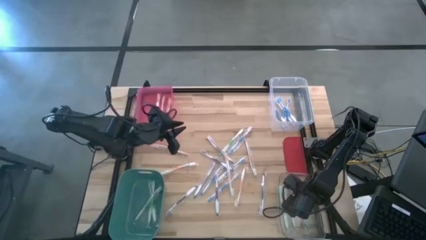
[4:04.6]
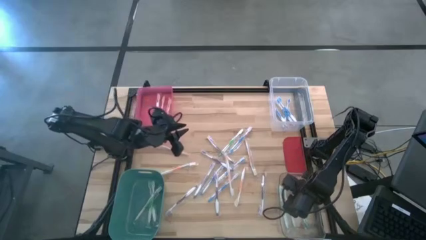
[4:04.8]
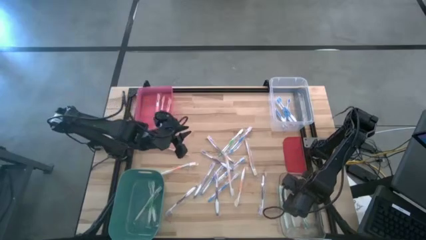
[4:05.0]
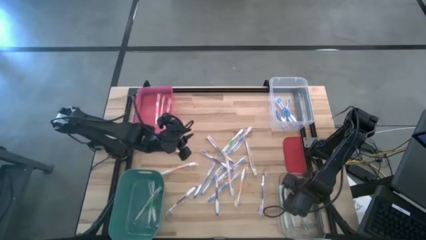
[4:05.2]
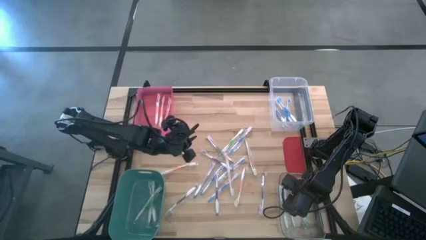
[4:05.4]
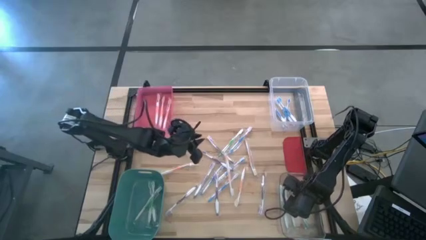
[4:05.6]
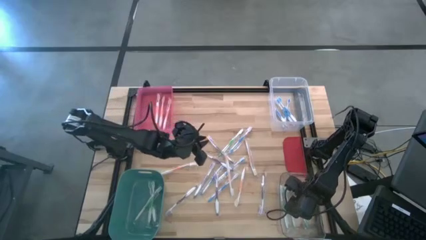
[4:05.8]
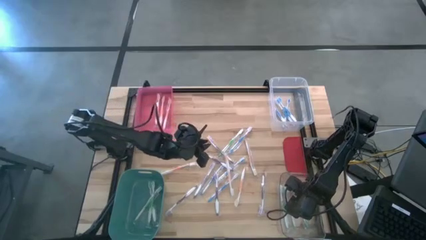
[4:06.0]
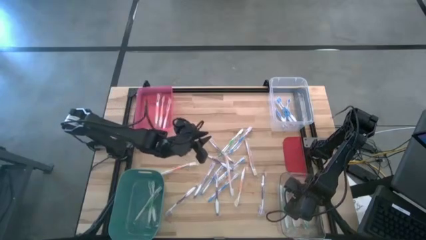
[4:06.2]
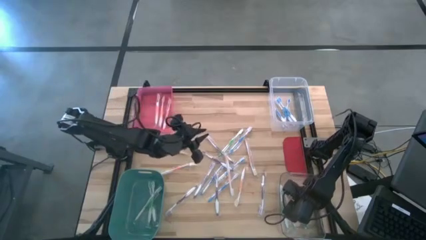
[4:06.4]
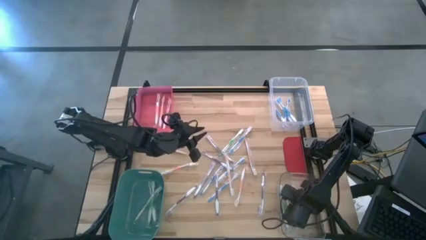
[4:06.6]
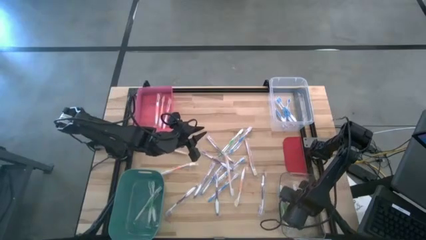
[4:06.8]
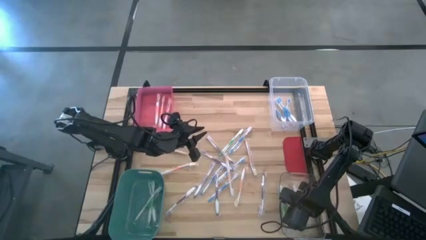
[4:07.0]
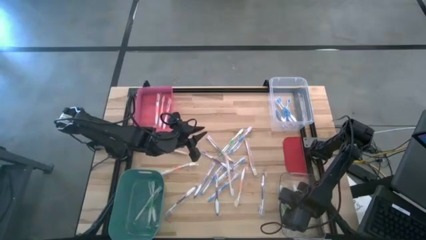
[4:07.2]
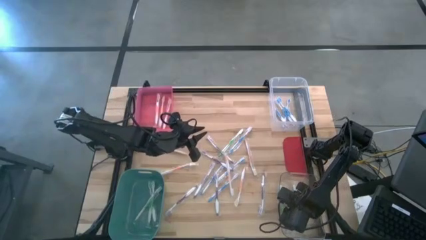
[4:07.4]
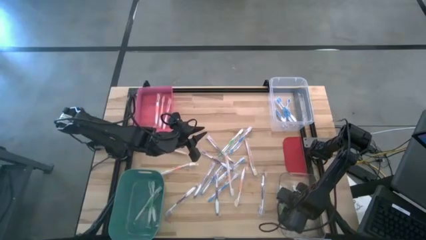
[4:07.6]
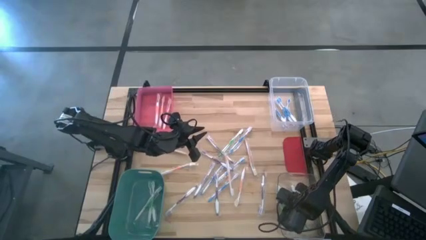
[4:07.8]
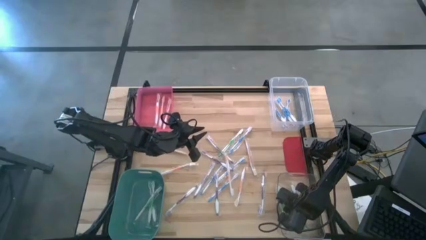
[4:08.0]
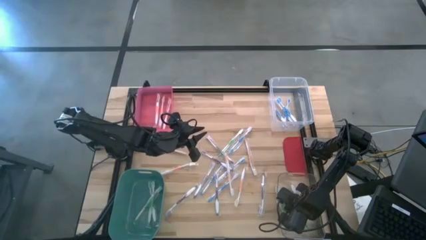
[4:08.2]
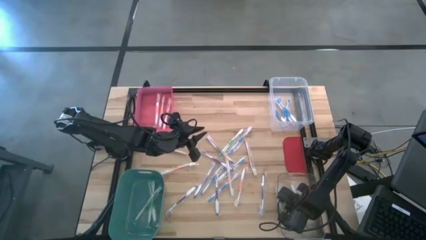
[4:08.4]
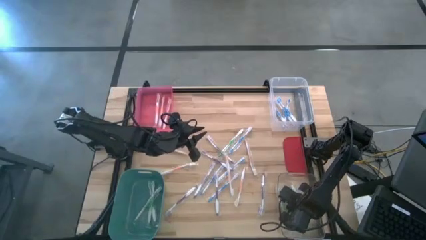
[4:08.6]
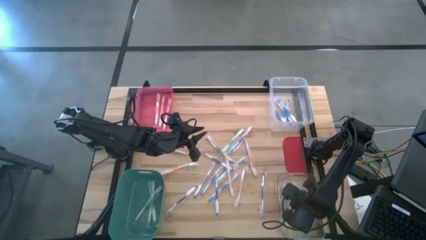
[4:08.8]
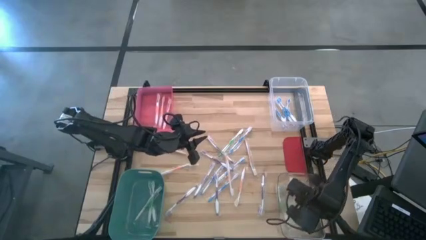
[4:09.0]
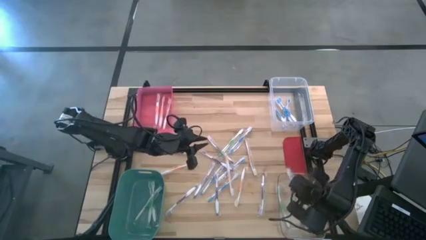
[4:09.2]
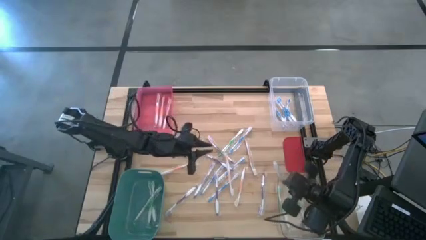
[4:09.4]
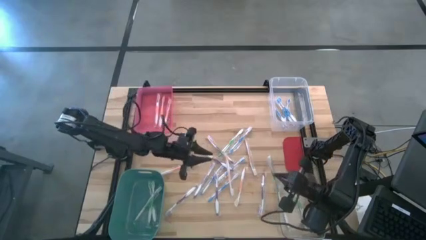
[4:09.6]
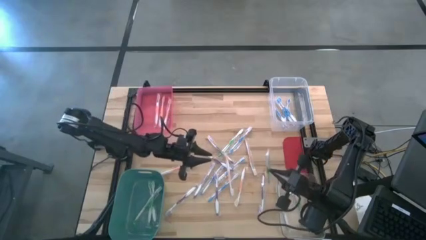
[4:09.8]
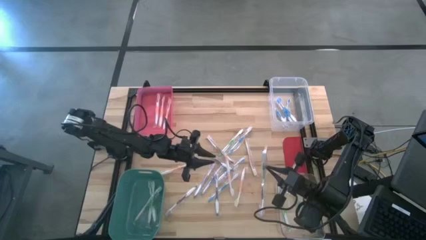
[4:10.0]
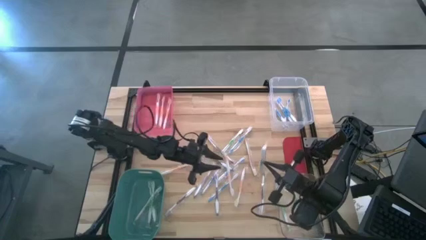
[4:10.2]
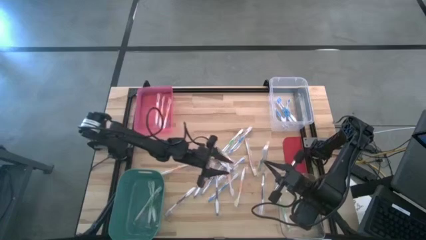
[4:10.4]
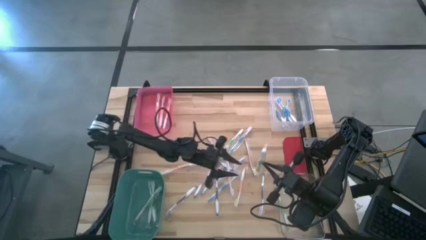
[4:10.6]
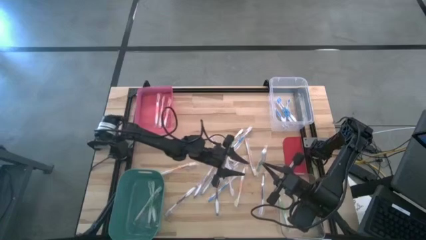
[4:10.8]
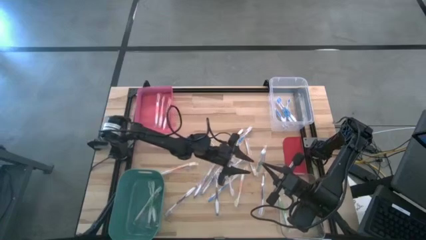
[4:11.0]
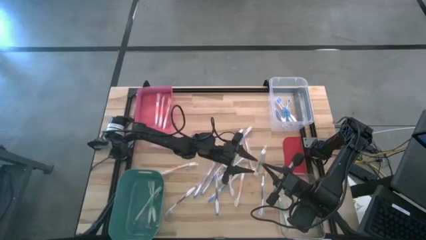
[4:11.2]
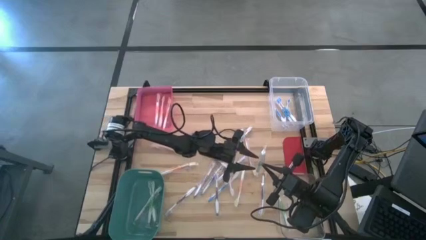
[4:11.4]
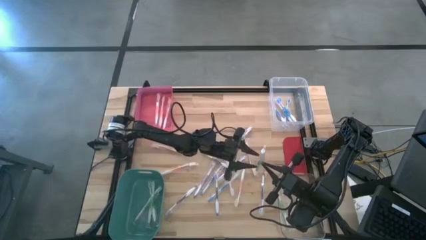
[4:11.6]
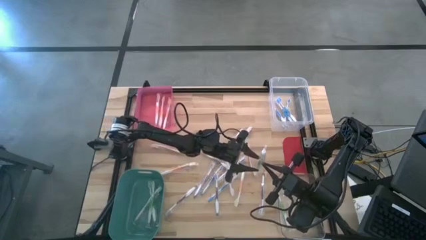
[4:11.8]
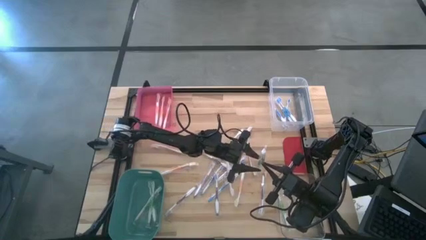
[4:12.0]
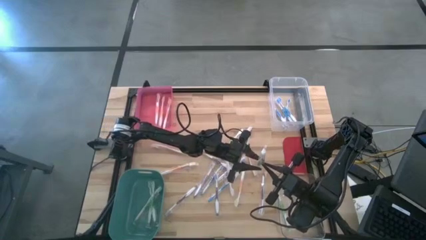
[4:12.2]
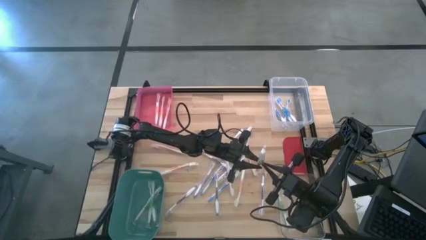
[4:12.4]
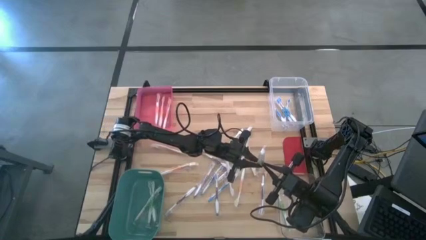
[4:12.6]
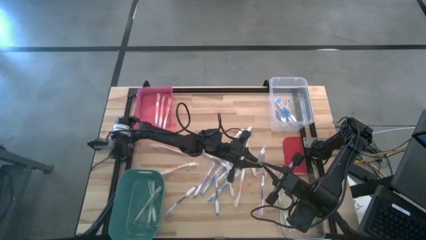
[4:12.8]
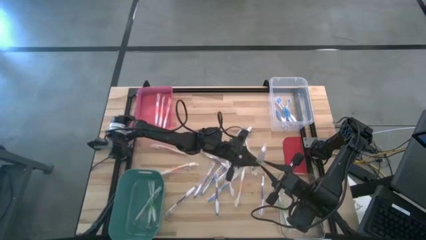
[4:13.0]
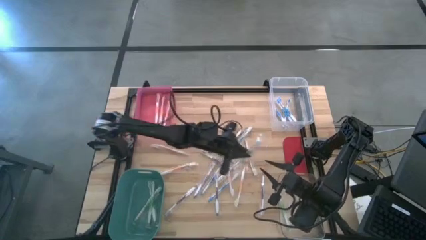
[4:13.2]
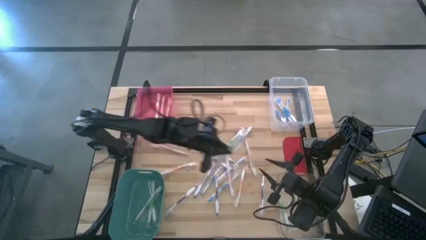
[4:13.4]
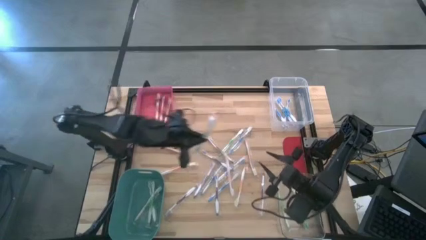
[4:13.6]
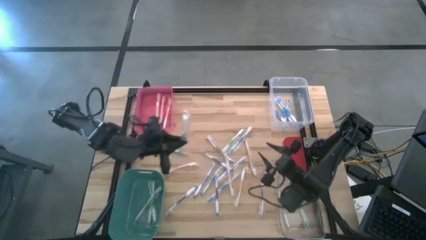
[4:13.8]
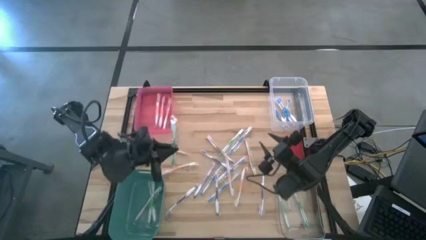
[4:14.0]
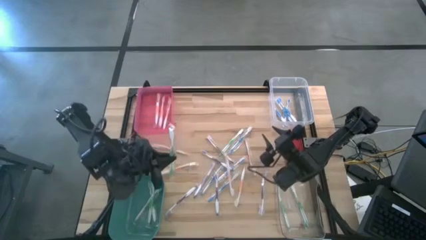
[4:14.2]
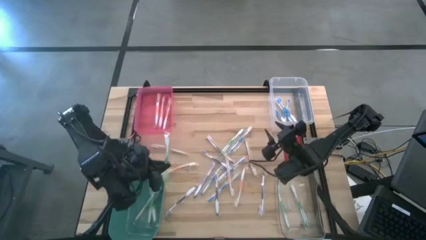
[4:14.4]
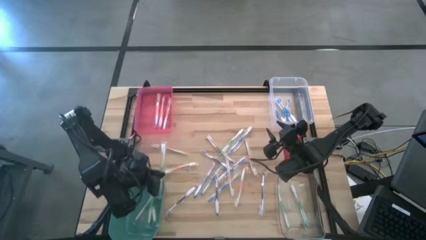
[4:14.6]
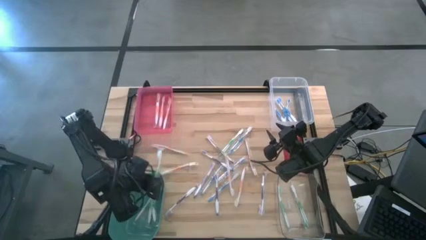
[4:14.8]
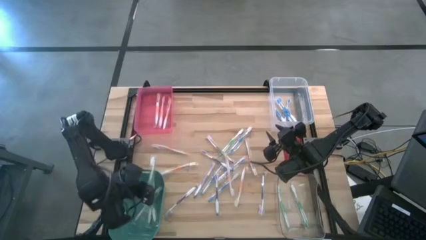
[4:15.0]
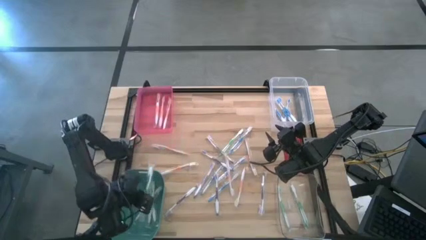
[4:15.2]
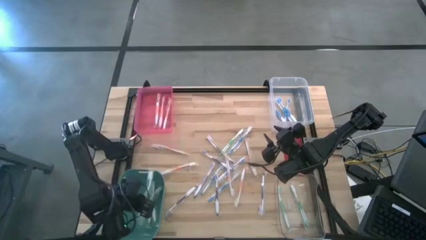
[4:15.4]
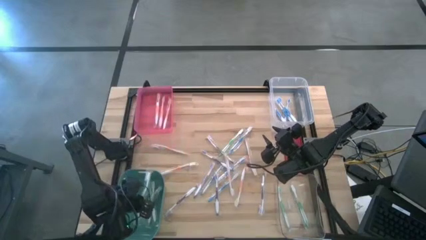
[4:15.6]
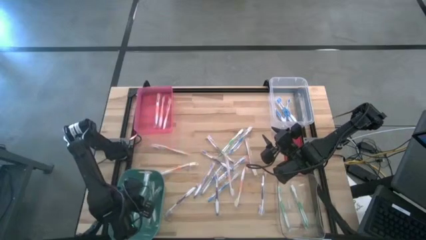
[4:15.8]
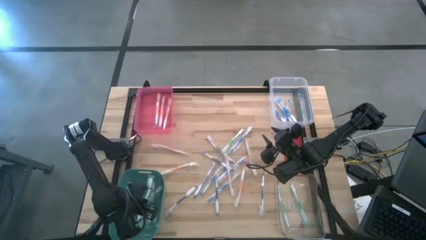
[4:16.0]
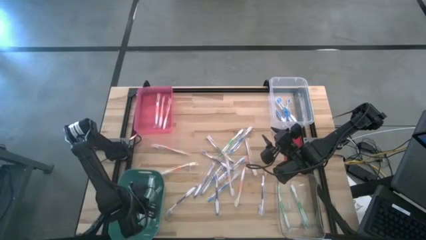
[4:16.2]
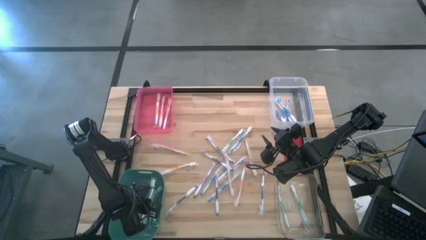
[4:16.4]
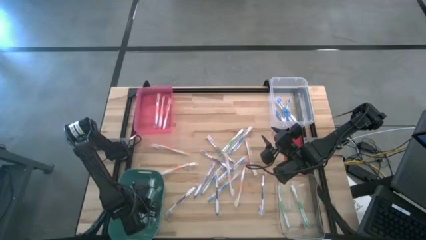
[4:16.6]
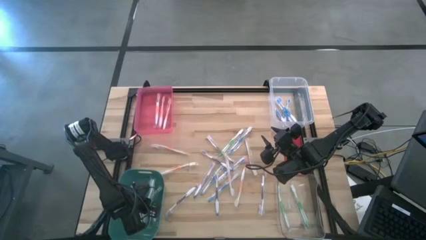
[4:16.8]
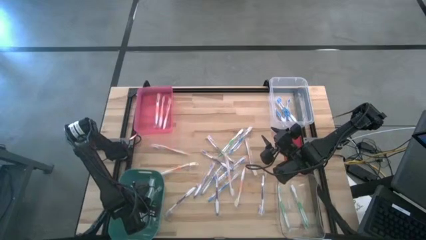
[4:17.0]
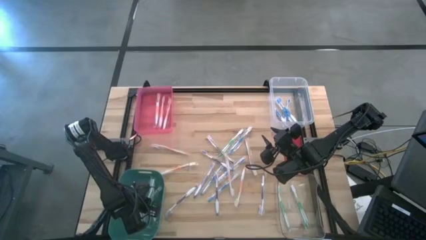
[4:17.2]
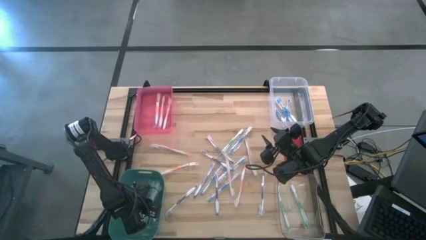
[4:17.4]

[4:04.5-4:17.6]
Task: Pick & Place Toothbrushes
Put the green toothbrush into the green bin

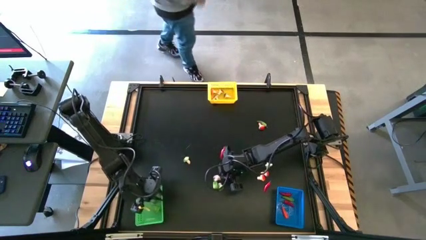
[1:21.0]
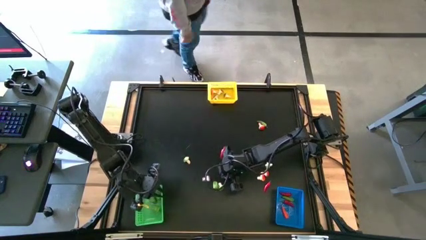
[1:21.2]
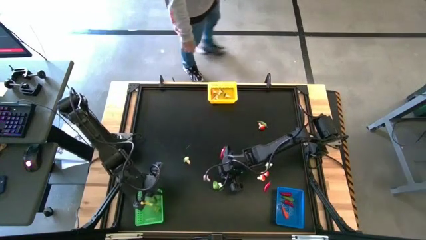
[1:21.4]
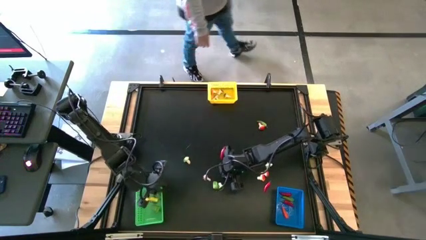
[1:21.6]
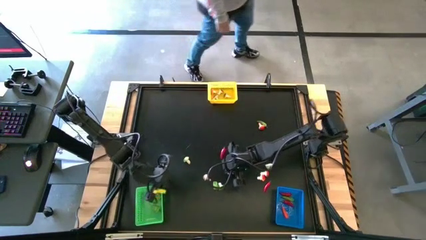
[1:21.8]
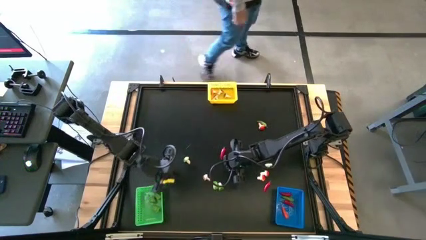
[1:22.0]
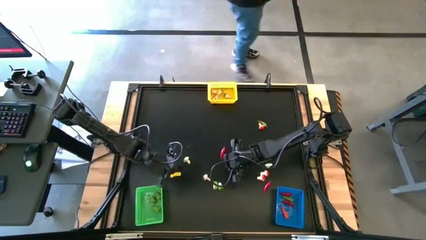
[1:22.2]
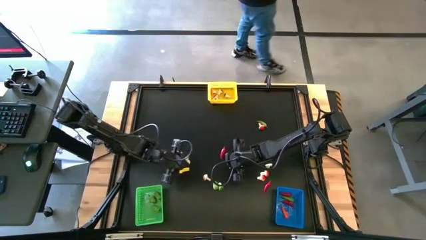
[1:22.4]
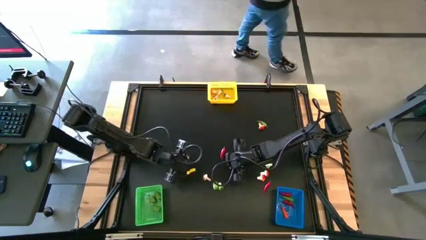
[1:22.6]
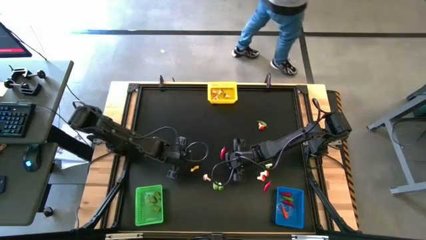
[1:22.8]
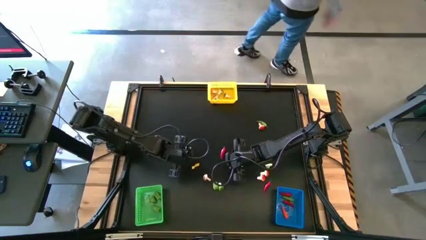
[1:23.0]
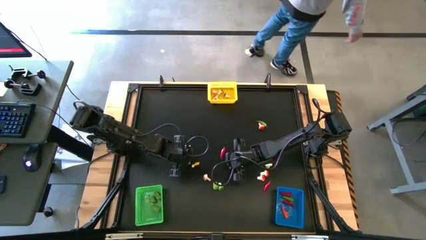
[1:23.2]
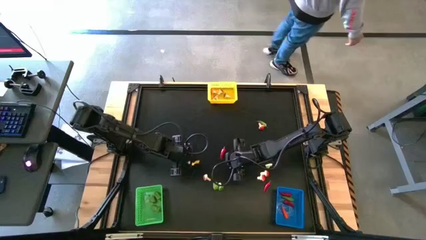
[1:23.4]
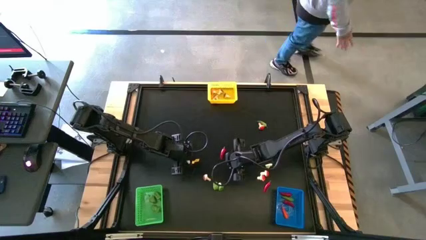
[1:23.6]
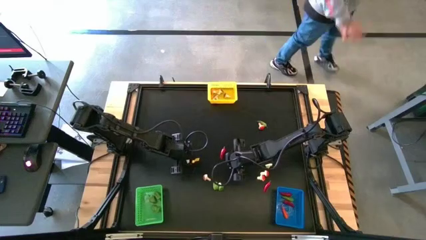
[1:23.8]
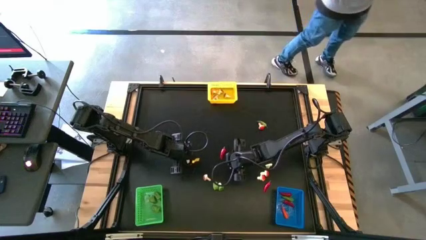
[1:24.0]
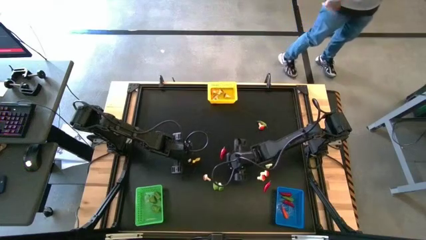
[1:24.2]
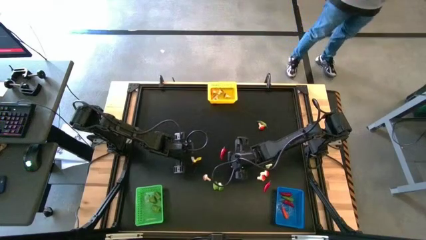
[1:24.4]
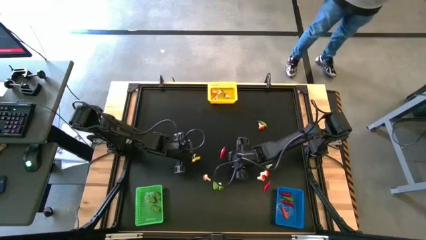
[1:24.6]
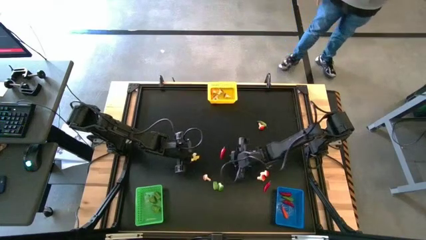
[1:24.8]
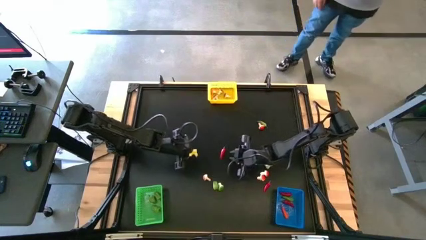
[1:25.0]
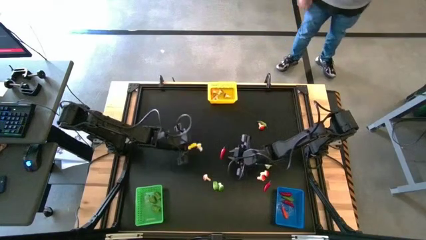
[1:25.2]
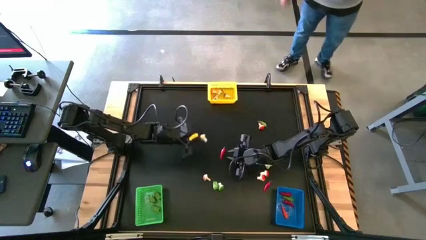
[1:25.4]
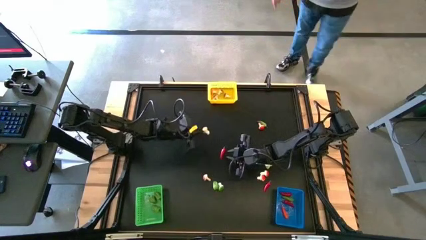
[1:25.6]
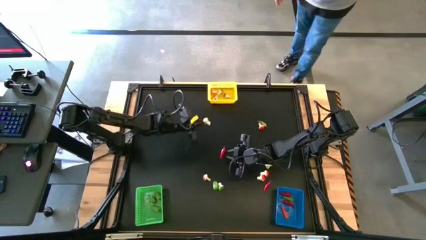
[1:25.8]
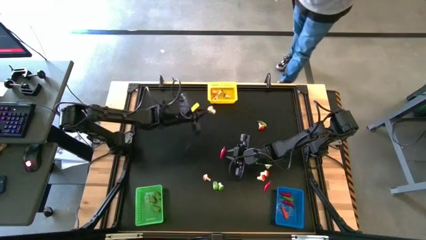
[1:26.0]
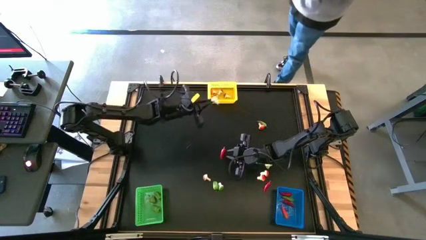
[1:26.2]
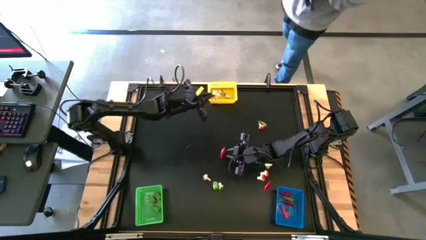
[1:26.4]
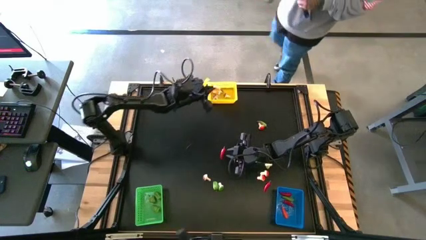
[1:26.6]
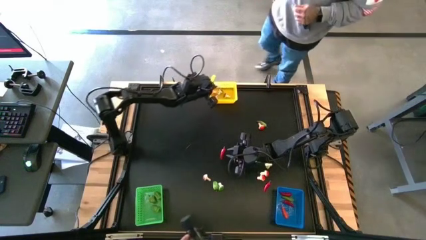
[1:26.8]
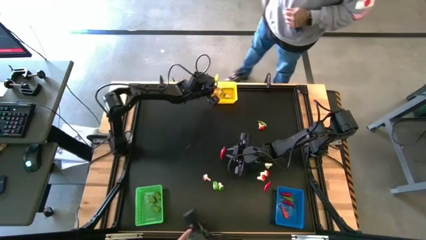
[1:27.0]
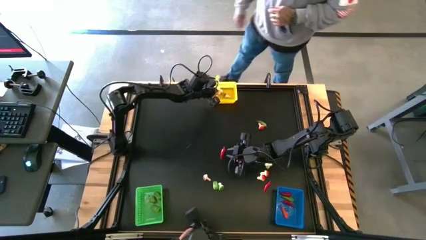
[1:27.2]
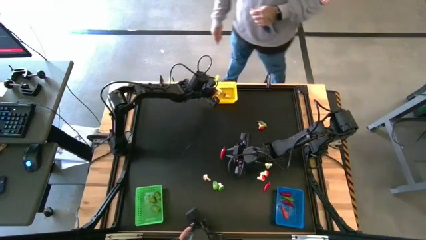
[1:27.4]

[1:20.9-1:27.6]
Task: Sort produce into baskets
Put the bottom left brown mushroom into the yellow bin
